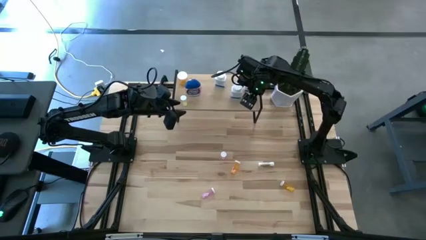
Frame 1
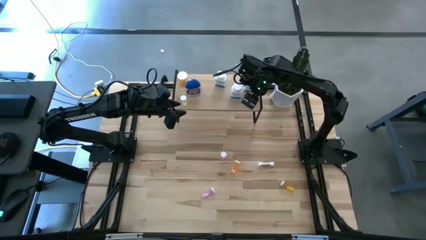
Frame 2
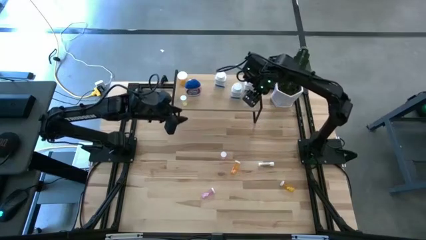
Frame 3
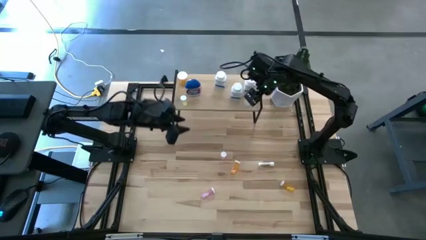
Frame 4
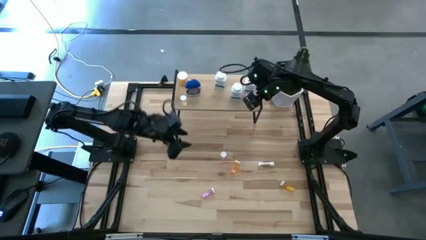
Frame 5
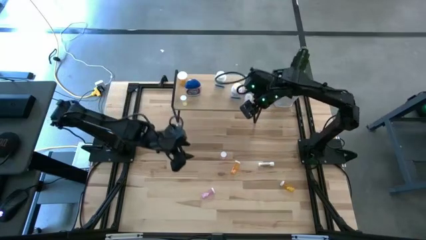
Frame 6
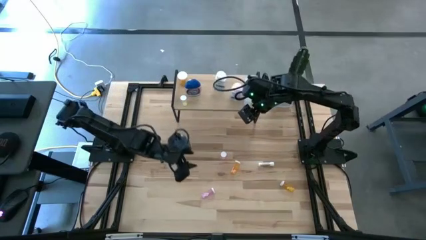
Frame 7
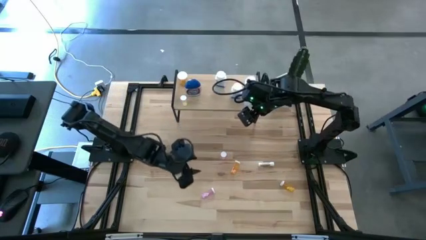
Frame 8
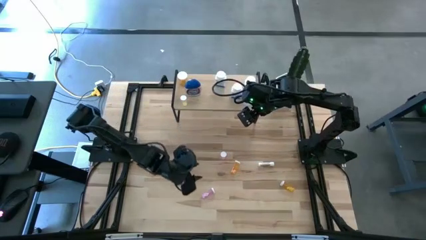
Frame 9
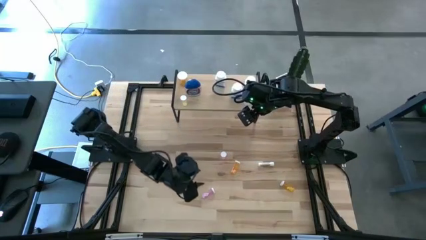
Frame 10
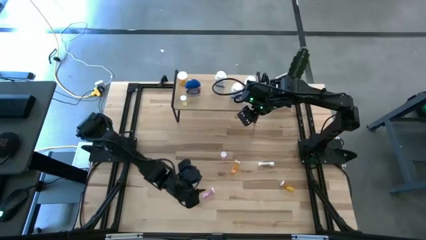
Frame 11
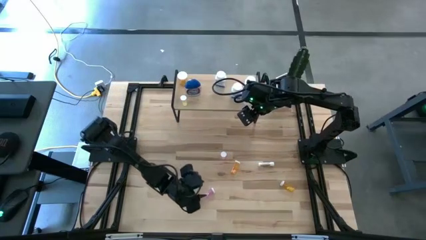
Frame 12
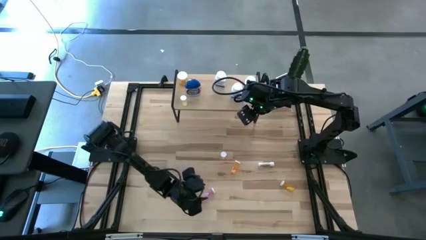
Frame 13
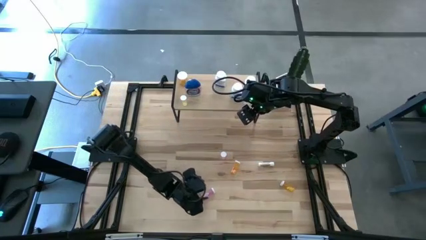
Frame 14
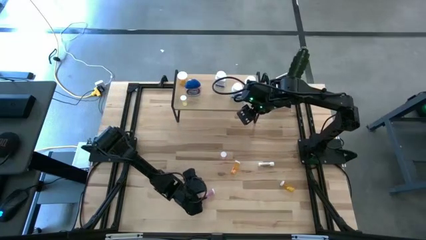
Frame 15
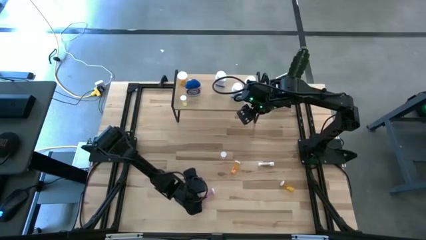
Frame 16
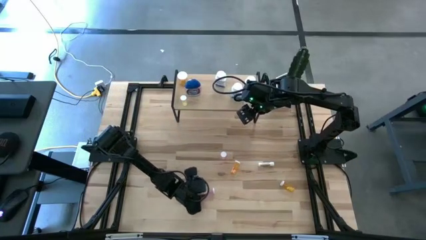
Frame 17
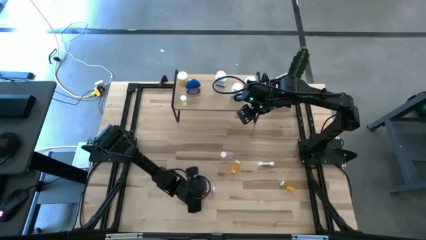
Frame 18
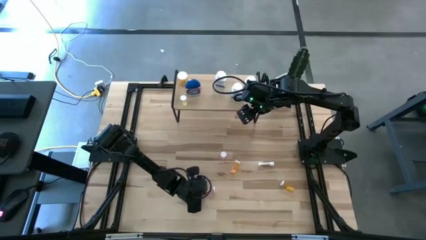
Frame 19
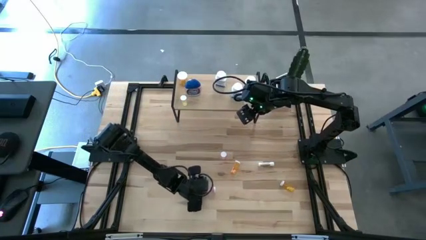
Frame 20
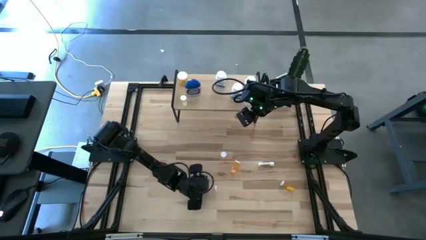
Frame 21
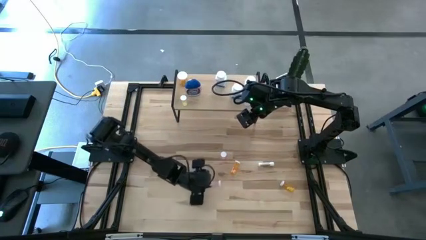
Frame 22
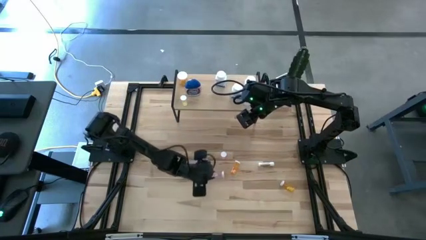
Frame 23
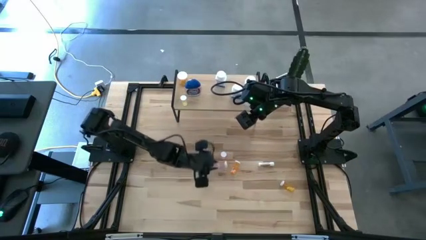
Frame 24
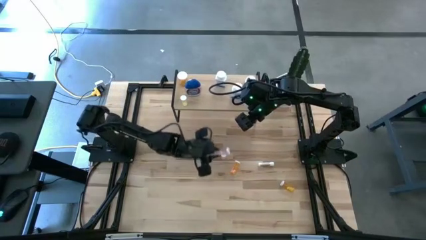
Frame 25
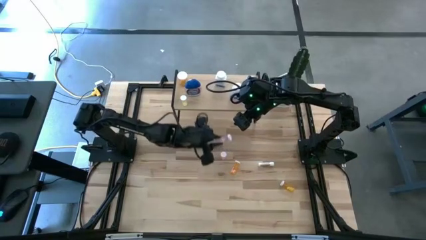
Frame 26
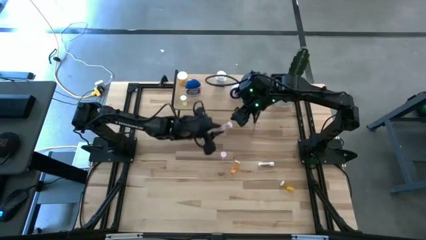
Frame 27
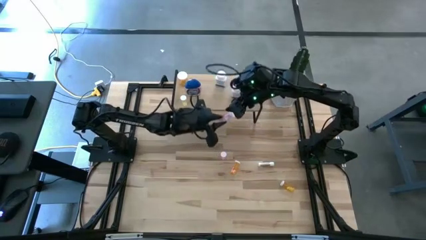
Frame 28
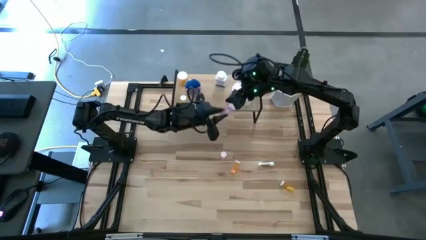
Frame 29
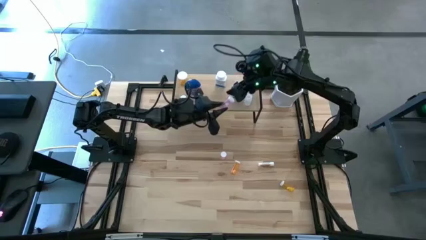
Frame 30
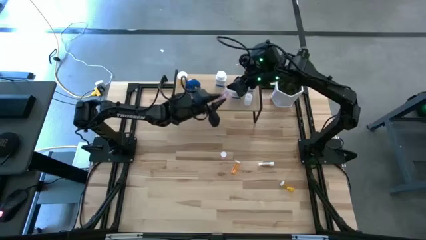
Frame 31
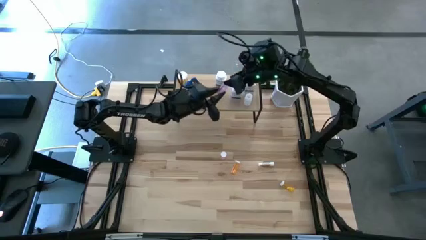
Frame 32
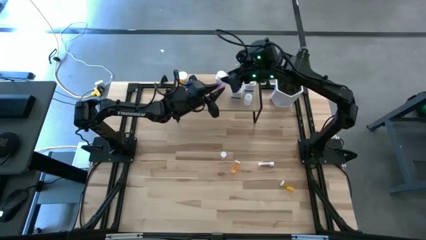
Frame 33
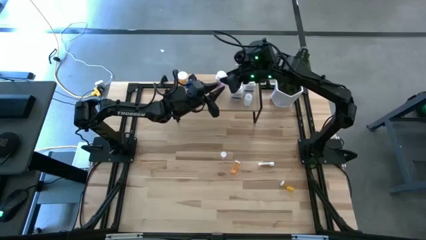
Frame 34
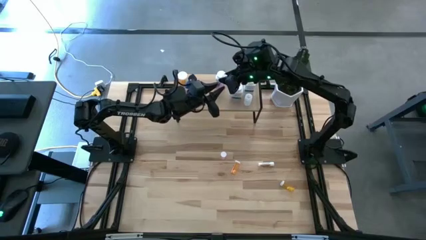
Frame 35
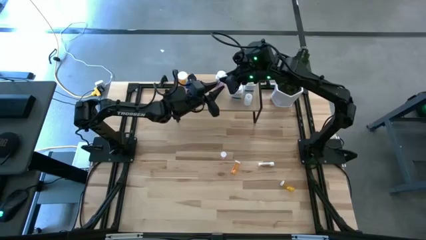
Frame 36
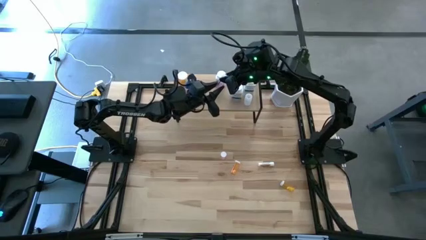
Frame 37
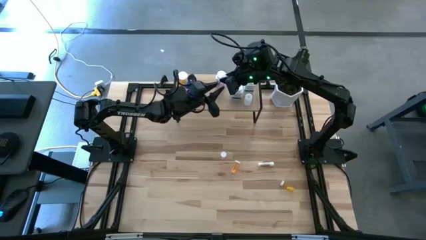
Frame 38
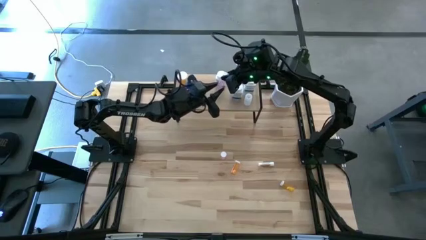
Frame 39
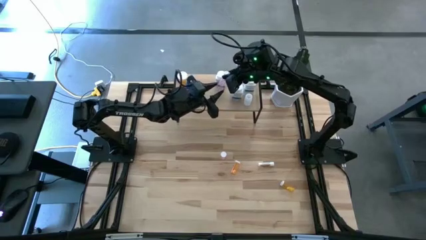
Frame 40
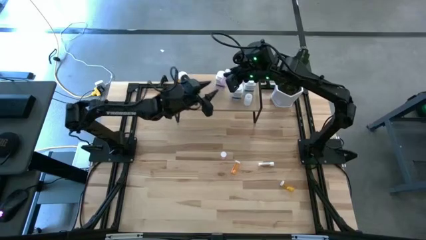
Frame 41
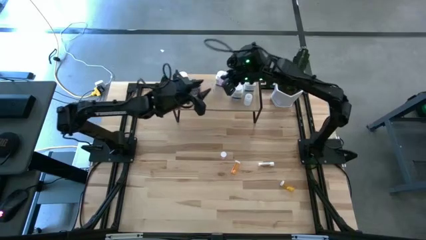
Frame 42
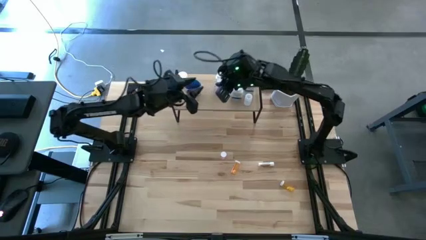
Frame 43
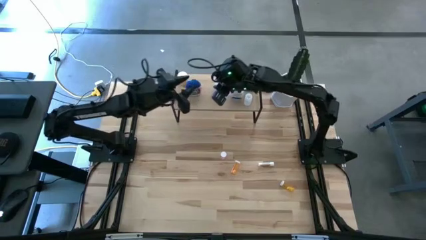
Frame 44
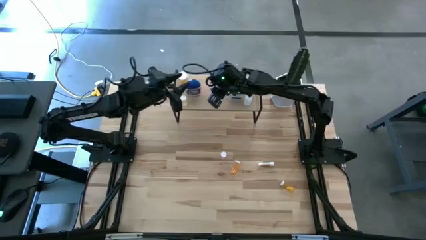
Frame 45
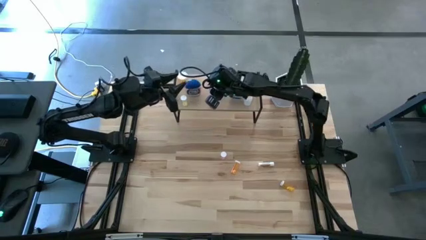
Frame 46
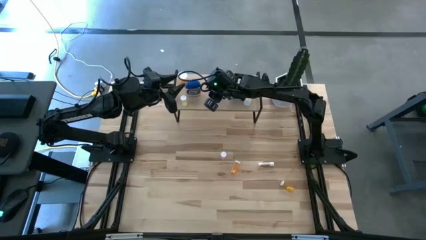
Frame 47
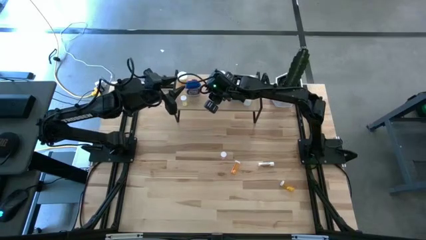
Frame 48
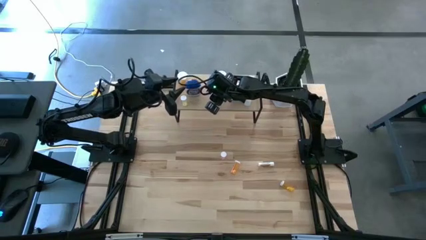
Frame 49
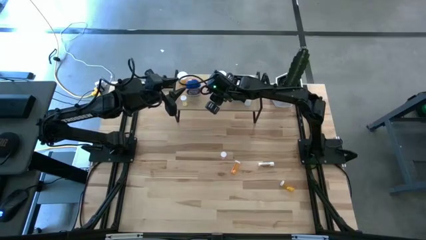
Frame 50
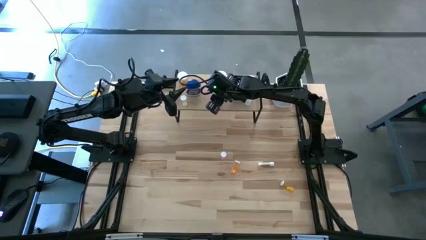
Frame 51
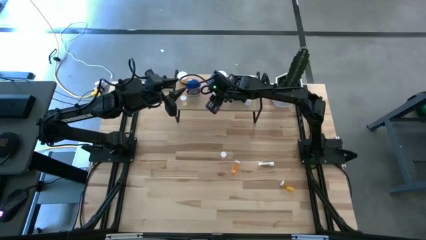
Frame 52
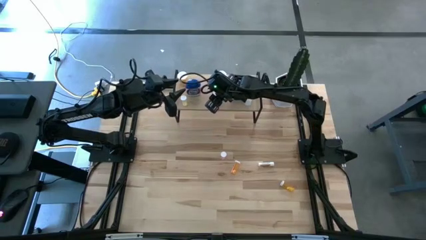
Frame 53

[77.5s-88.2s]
Task: Pick and place medicine bottles onto shelf by color
Put the pink pill bottle on the shelf

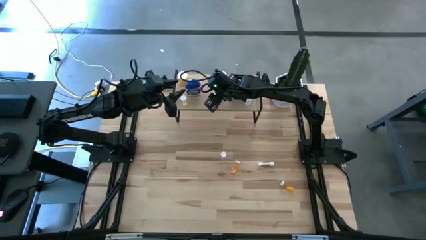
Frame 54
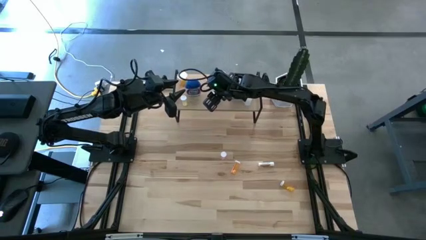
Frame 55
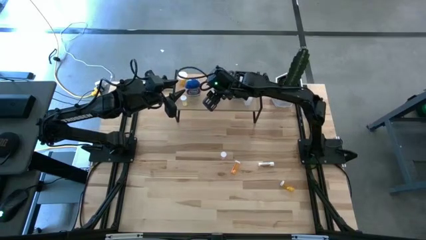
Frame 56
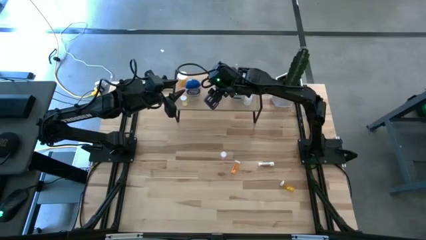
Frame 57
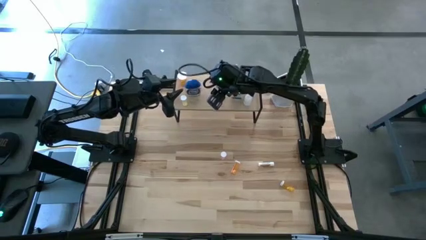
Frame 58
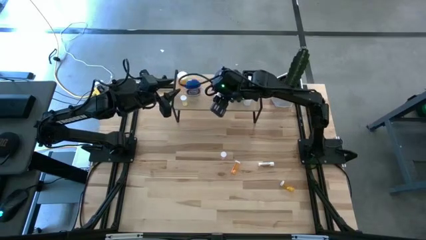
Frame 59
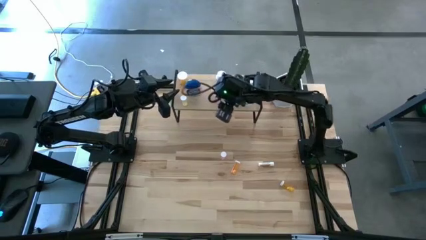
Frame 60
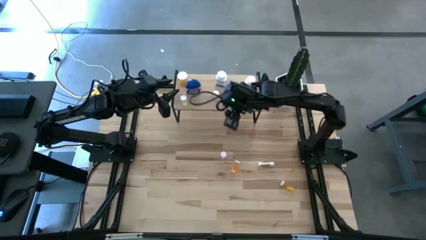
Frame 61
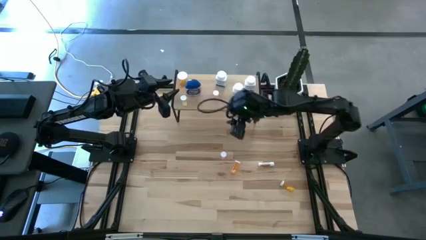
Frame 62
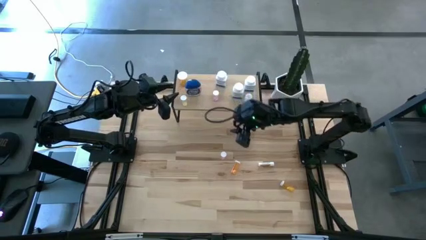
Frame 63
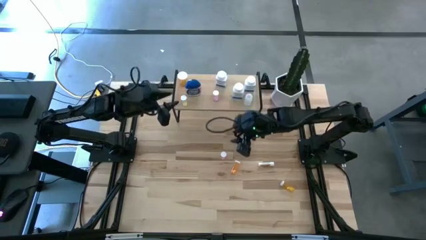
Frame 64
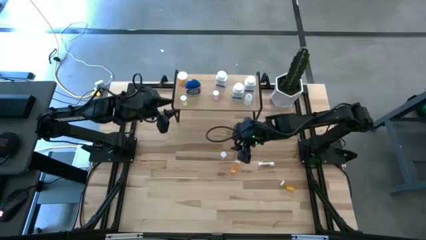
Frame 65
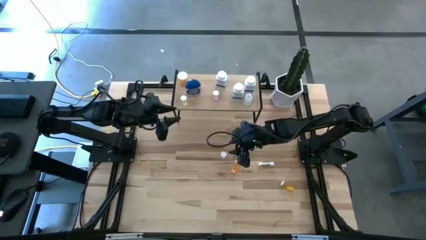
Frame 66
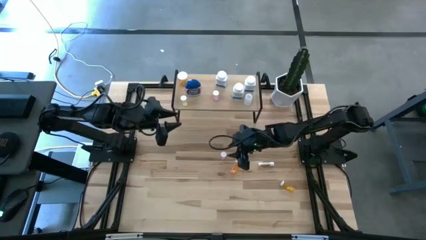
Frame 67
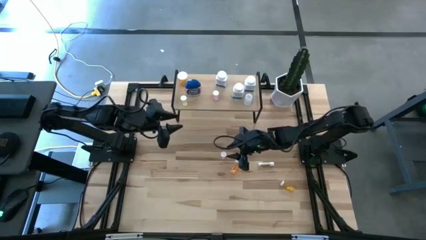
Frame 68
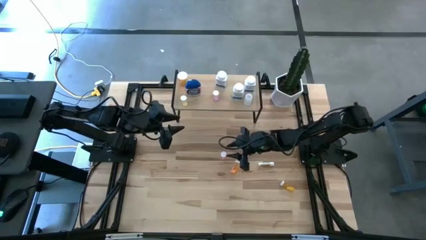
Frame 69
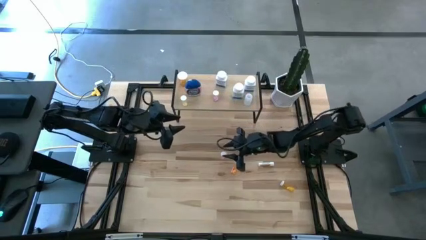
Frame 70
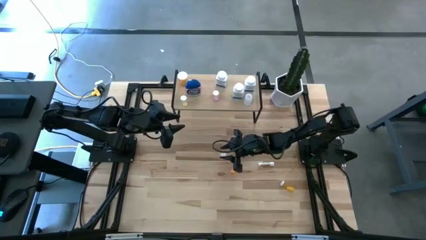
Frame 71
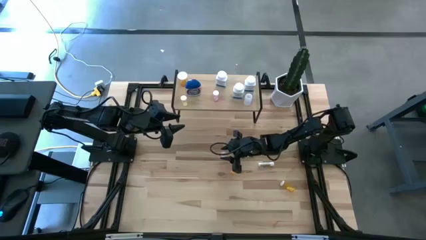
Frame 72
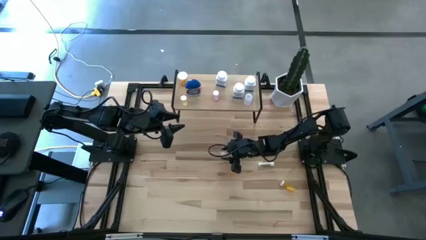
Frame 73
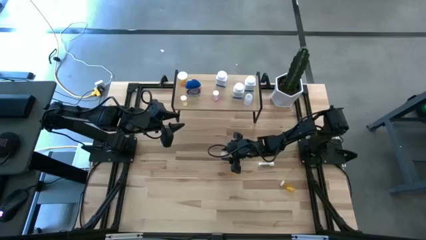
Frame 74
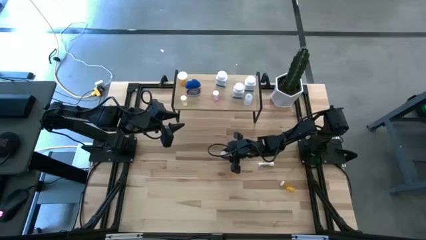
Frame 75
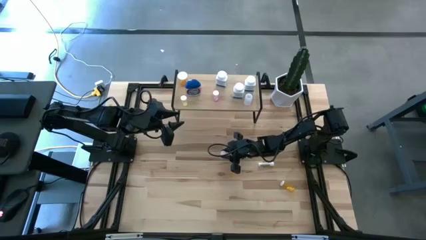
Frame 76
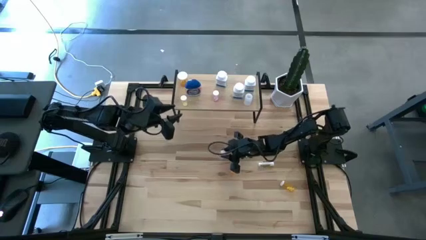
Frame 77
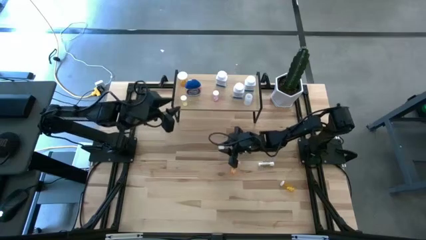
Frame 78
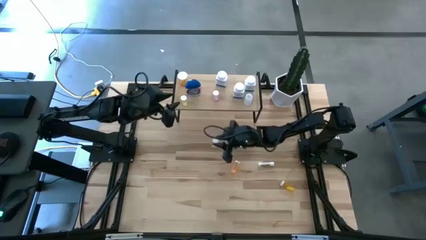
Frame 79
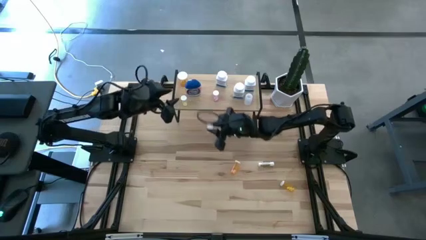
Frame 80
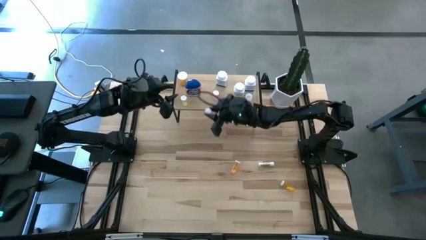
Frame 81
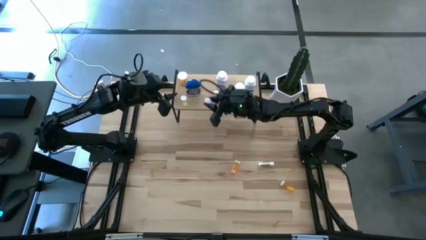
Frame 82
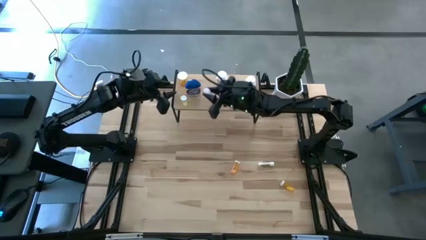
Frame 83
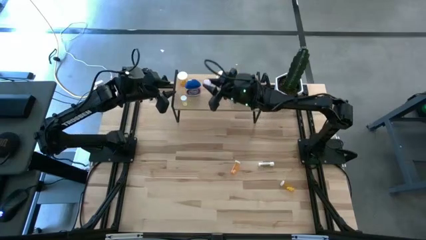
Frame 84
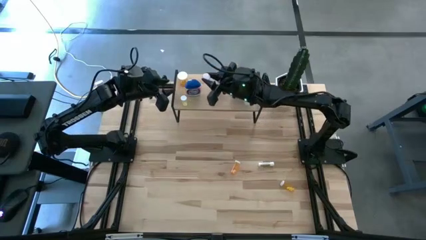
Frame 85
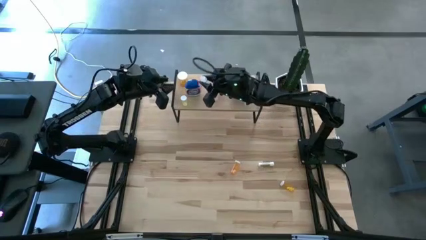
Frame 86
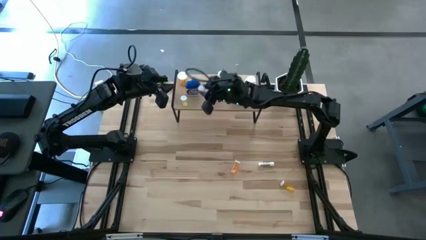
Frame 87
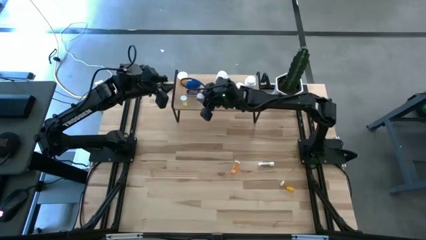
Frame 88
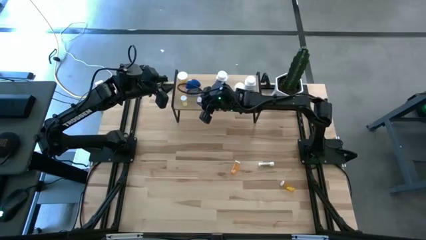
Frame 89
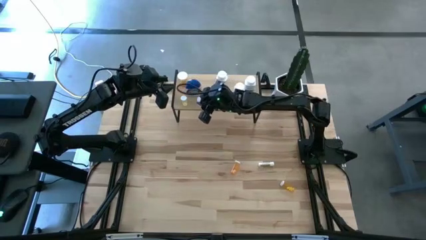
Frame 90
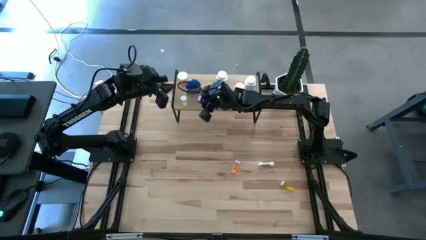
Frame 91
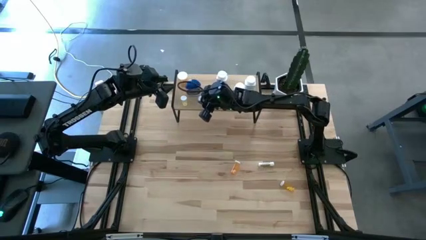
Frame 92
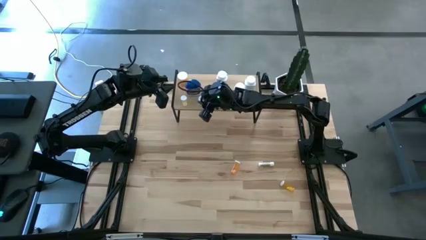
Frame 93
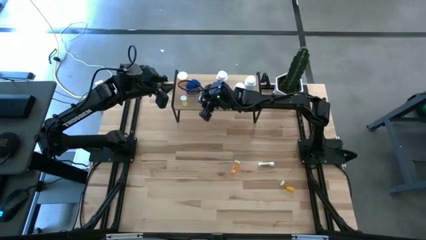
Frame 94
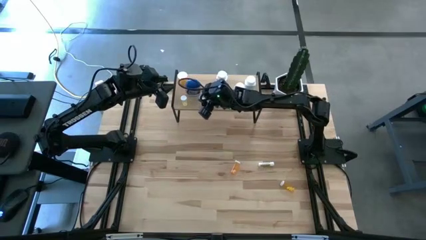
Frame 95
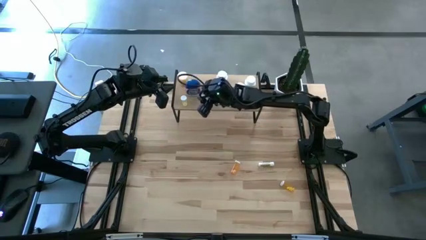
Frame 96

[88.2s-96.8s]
Put the red pill bottle on the shelf
